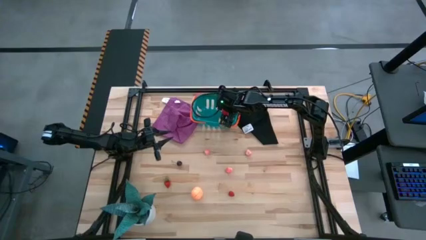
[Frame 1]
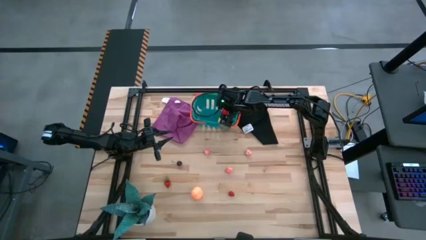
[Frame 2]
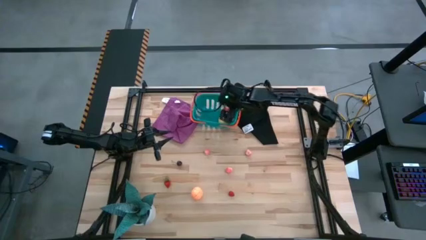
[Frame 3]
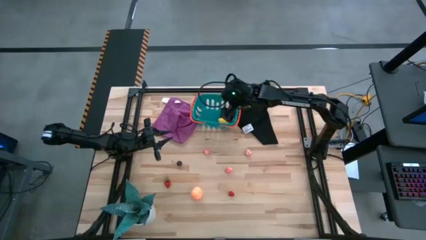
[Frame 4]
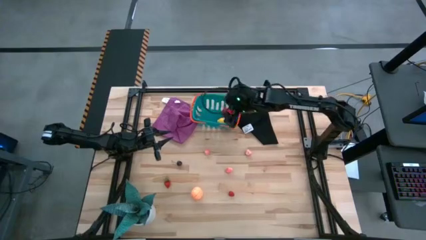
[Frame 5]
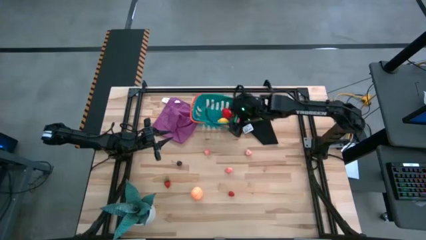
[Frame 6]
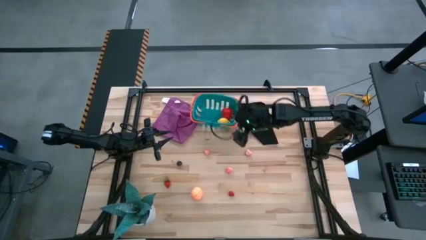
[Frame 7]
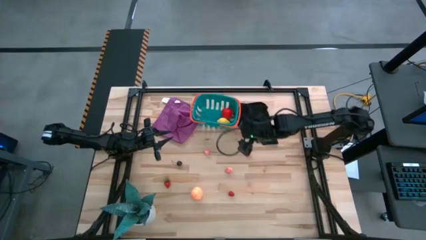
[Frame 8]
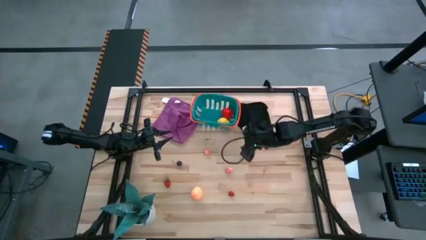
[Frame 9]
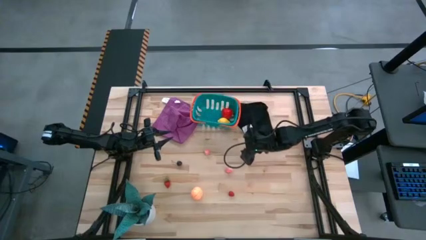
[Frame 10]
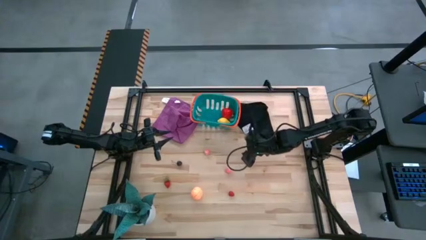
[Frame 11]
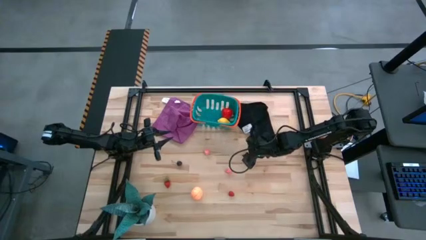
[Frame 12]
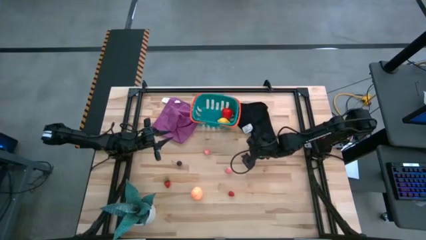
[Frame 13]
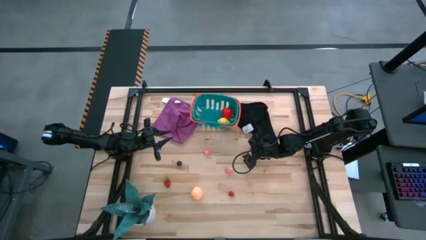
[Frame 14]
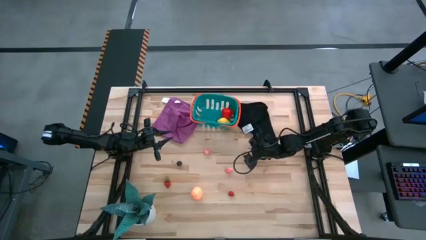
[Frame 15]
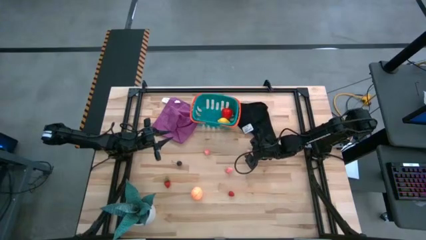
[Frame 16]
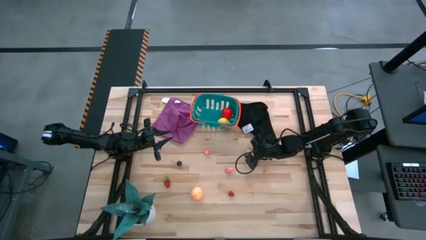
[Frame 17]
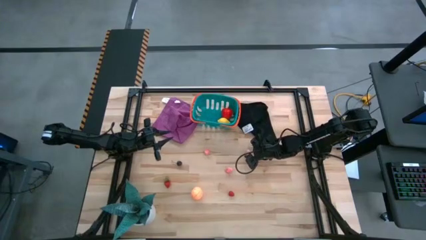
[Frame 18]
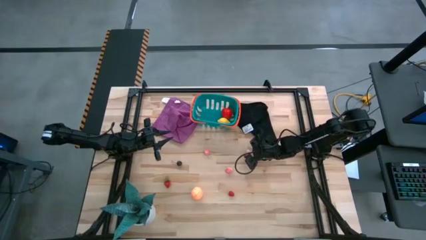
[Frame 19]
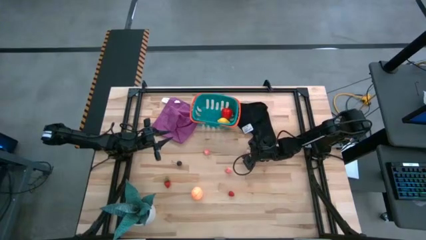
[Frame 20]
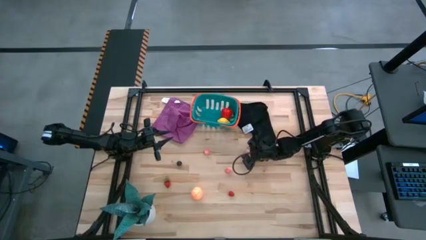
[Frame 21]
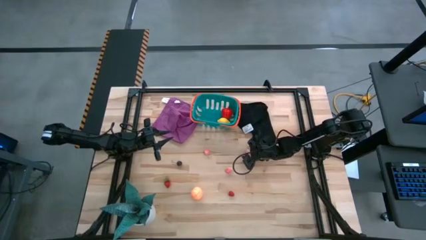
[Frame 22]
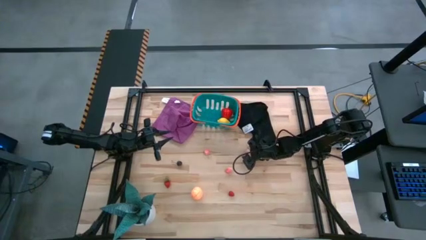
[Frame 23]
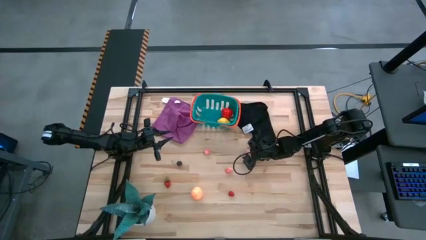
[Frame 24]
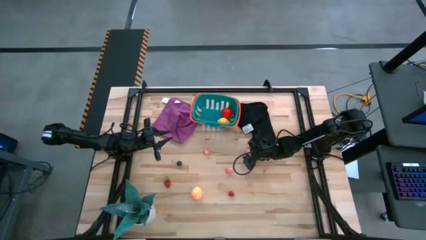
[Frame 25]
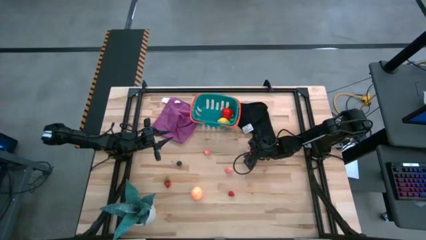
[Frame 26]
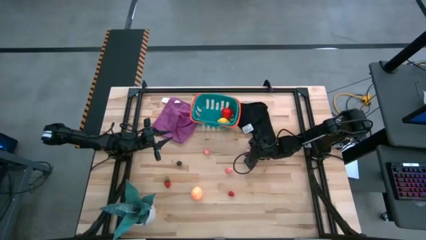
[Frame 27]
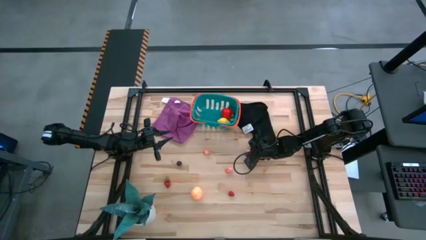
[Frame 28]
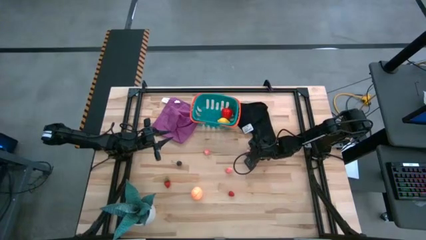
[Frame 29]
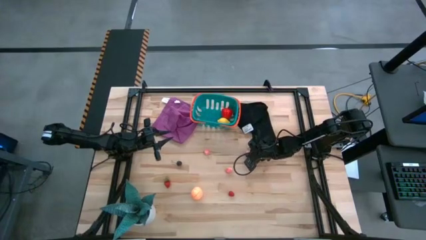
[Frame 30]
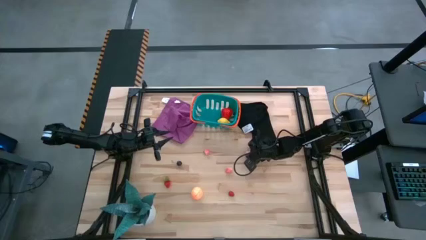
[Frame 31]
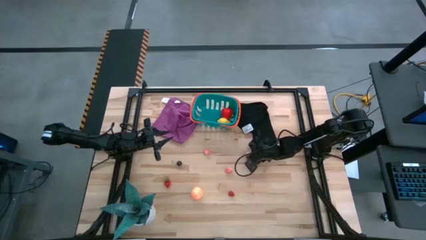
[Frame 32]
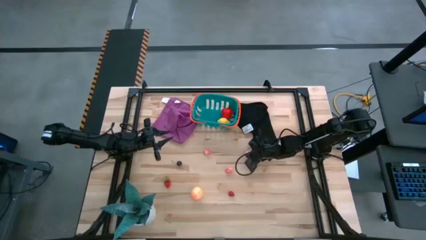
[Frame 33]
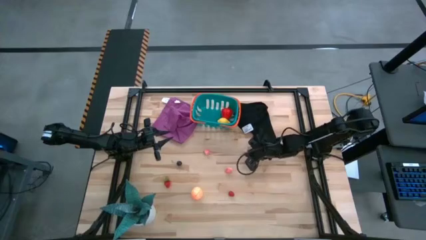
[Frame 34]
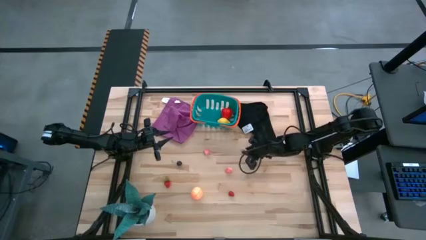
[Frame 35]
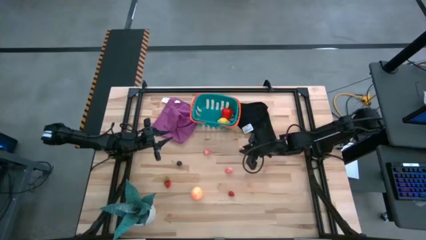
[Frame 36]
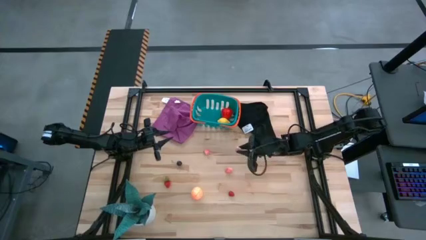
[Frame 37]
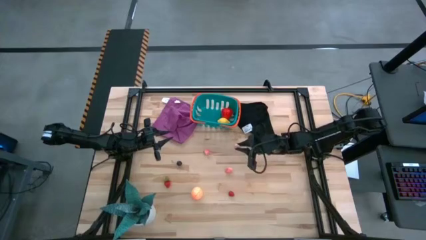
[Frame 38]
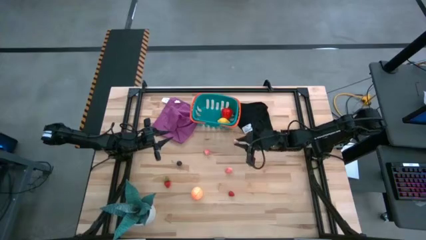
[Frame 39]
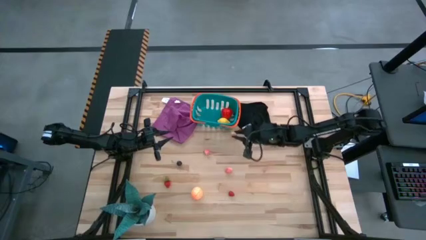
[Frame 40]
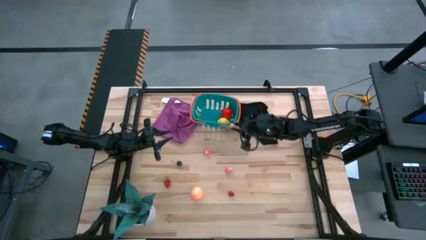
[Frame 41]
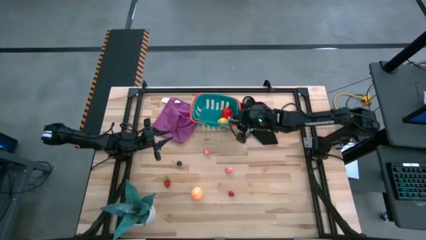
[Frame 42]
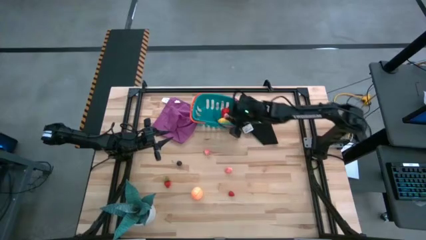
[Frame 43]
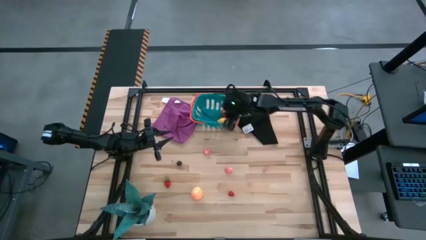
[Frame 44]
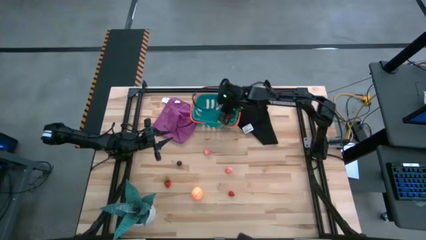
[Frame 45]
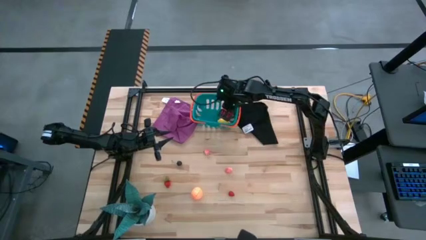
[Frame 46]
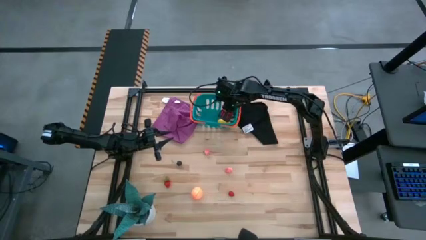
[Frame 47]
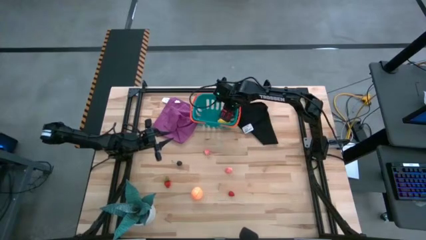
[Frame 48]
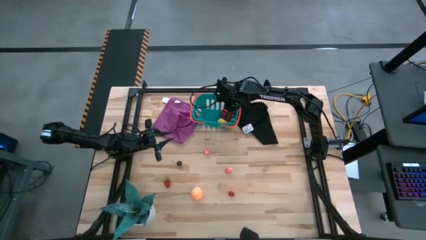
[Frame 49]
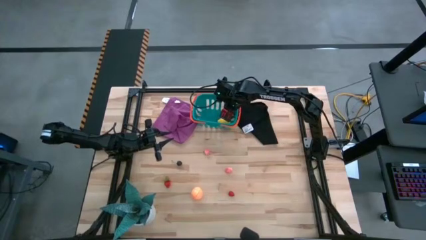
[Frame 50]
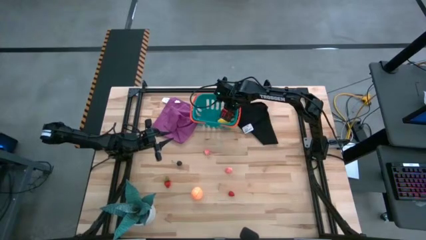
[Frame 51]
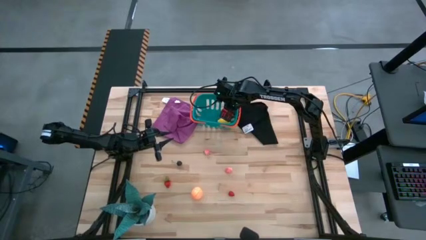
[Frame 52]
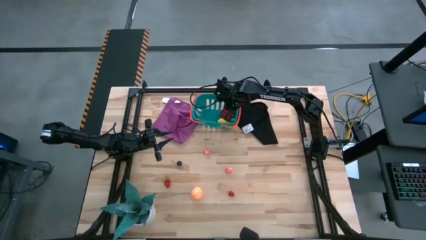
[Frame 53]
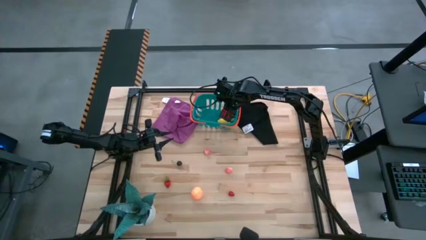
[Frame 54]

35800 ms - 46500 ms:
Task: Pick and placing Produce into tupperware
Put the right pink peach into the blue bin

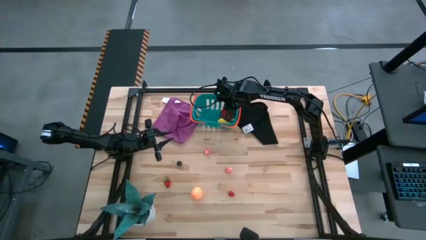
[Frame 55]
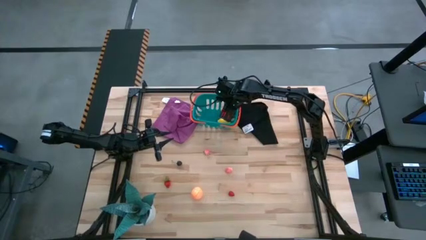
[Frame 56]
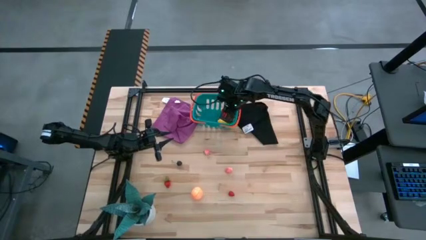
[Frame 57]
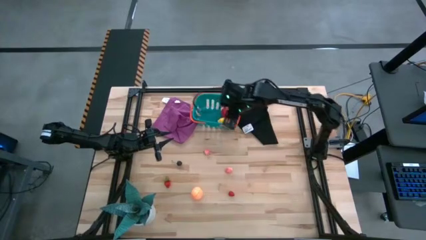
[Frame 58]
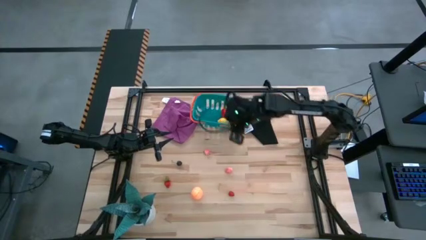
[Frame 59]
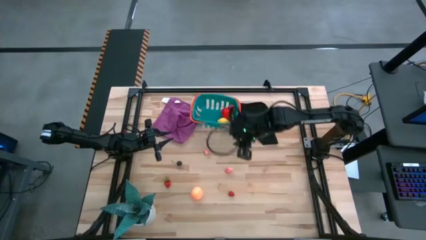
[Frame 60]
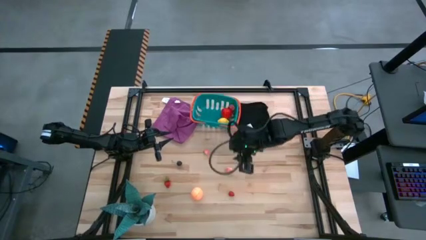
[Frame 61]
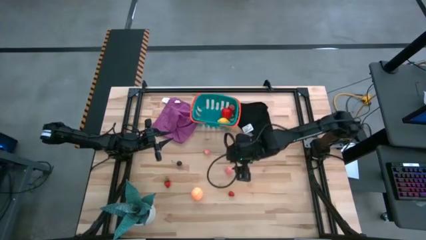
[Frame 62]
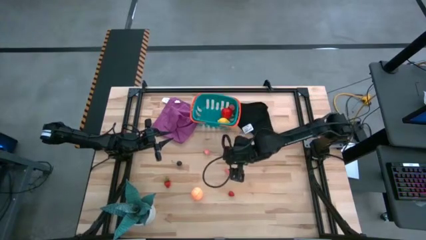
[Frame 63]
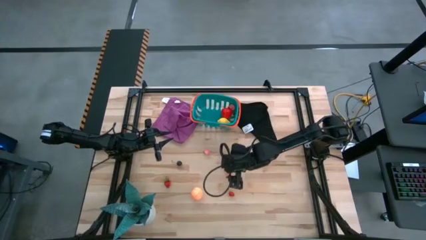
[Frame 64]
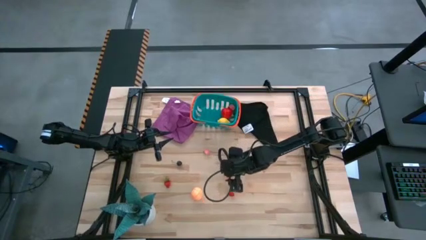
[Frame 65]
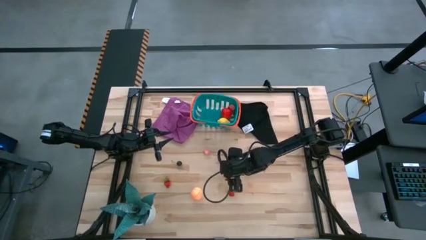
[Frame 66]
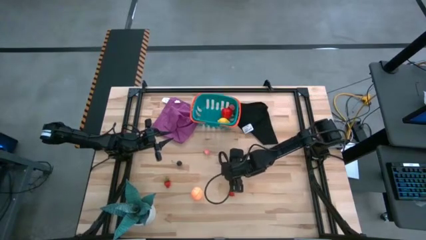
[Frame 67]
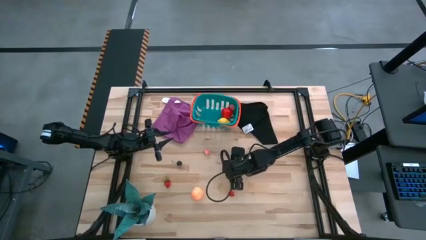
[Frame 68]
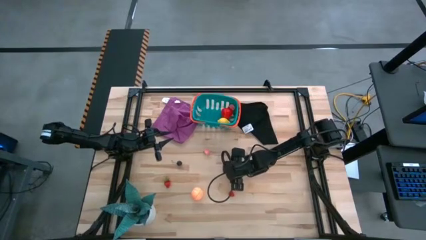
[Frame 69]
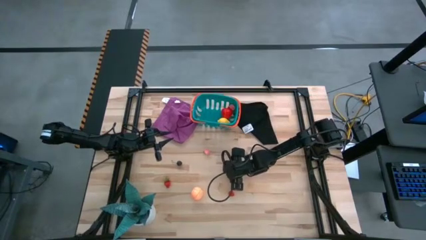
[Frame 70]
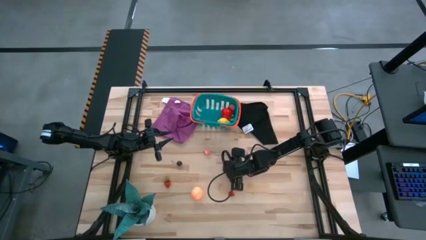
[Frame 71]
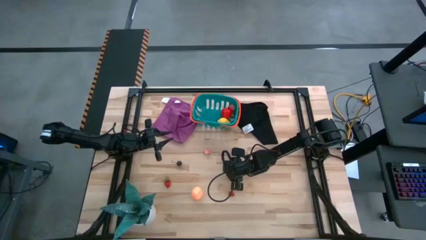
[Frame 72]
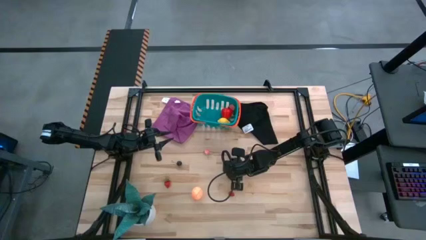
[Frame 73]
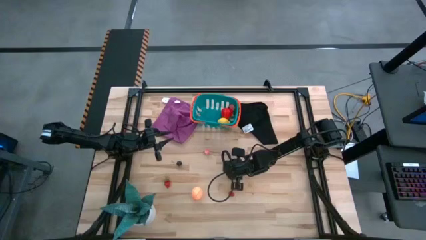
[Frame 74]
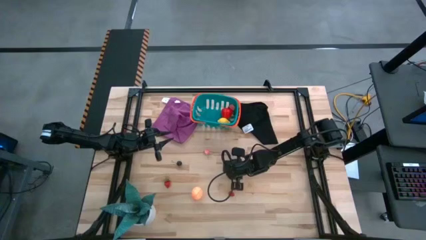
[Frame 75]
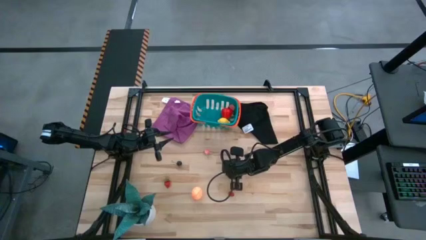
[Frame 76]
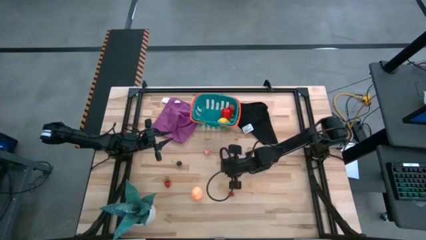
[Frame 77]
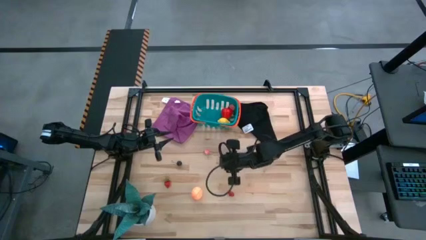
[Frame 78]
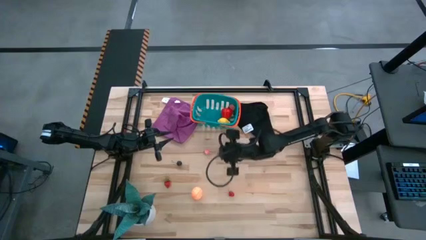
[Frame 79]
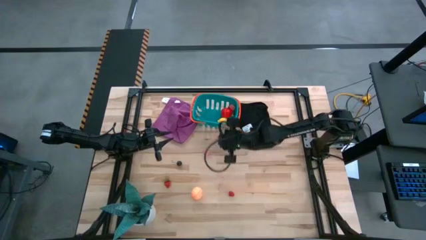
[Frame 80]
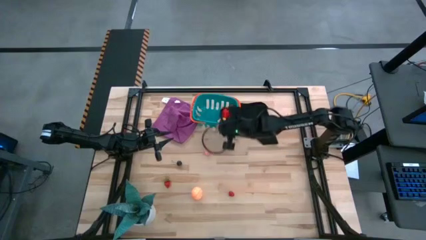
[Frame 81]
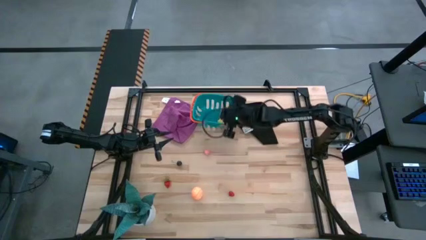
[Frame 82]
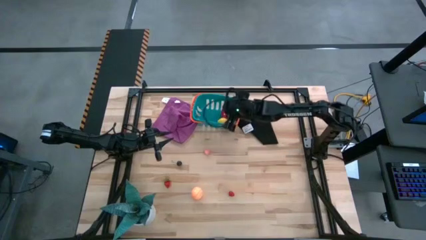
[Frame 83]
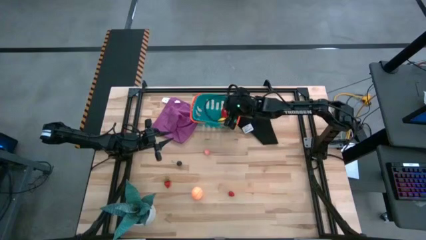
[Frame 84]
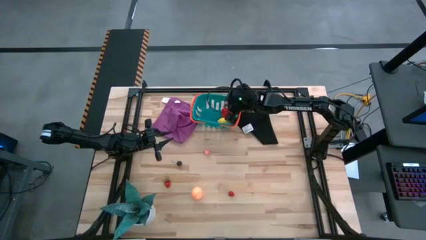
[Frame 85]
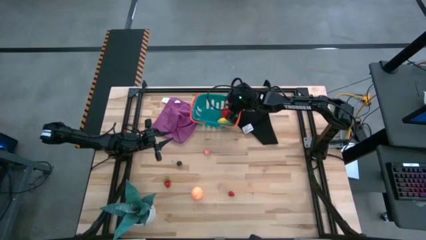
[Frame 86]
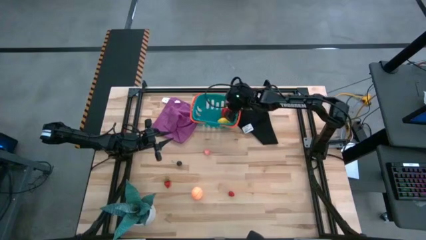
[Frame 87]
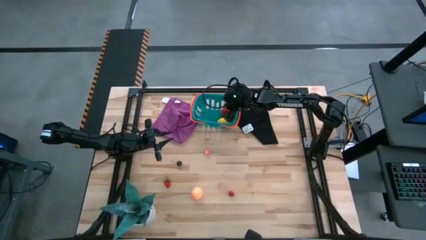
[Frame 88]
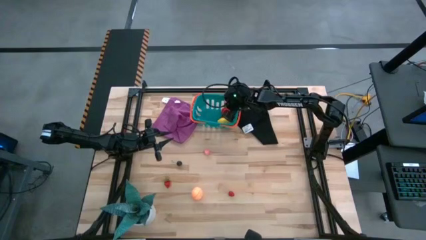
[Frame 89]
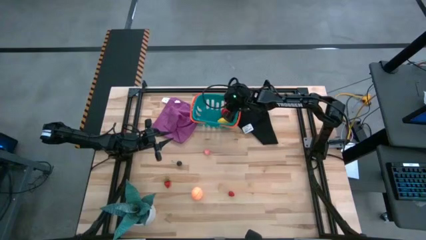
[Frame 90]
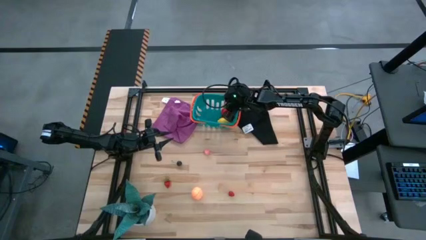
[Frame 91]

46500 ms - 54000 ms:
Put the bottom pink peach into the blue bin
